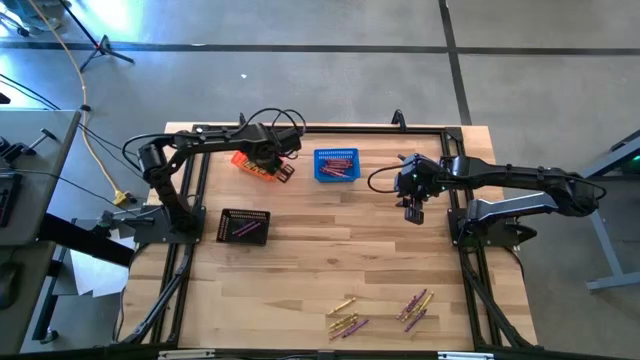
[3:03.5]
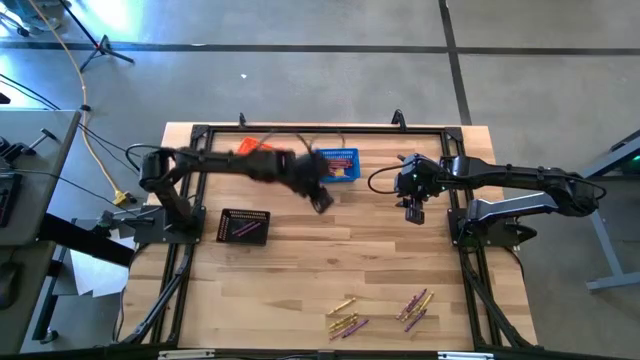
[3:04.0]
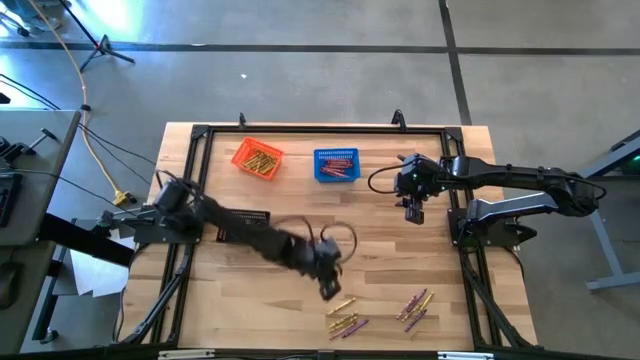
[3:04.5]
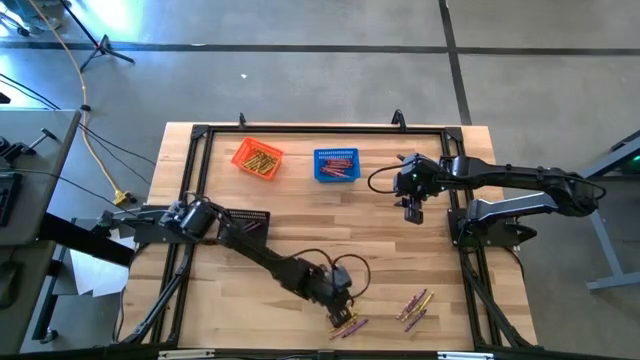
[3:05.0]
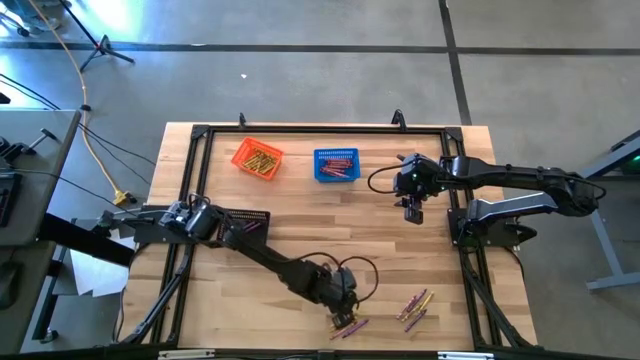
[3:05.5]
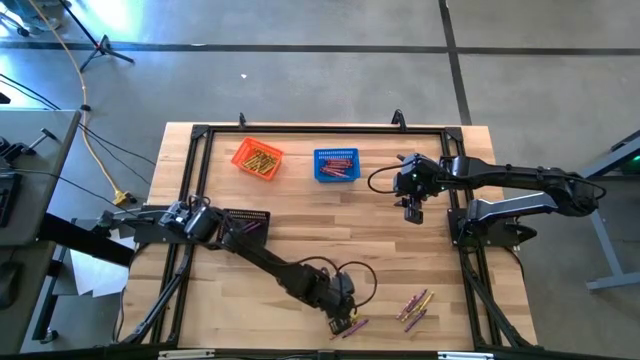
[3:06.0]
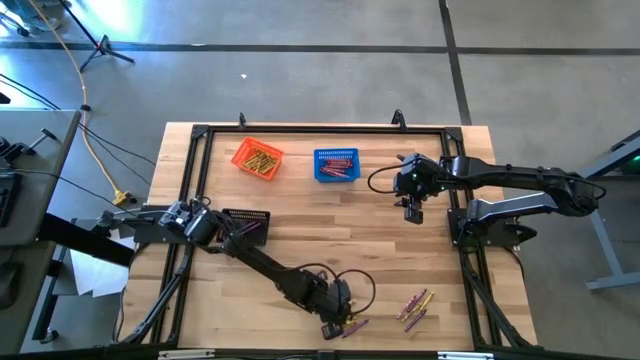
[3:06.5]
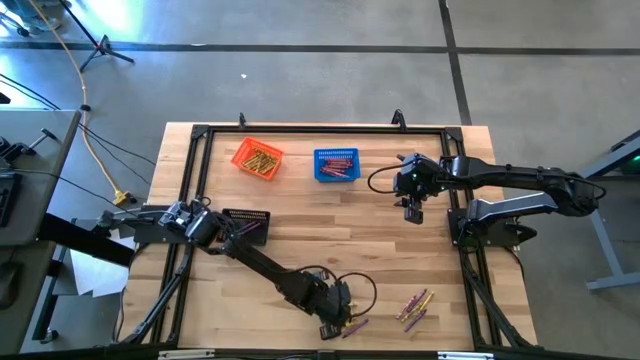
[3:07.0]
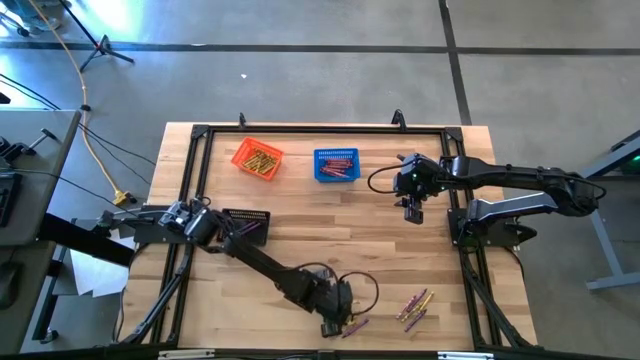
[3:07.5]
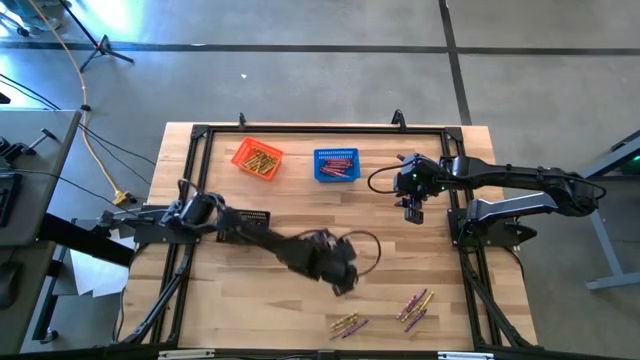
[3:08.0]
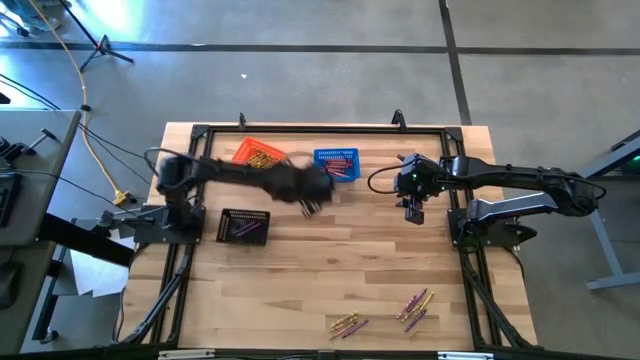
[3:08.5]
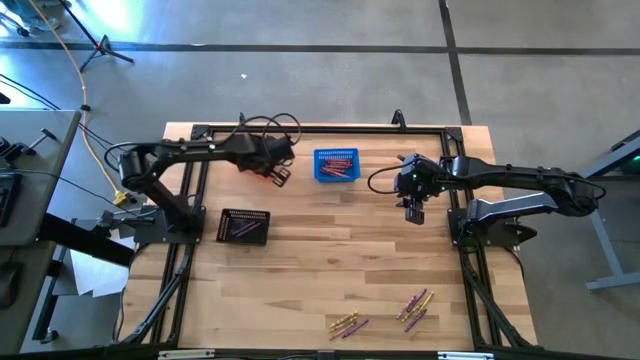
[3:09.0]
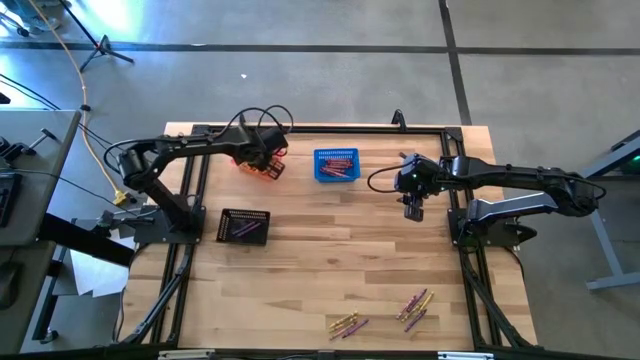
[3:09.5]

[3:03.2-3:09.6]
Task: Sort crayons
Put the yellow crayon into the orange bin

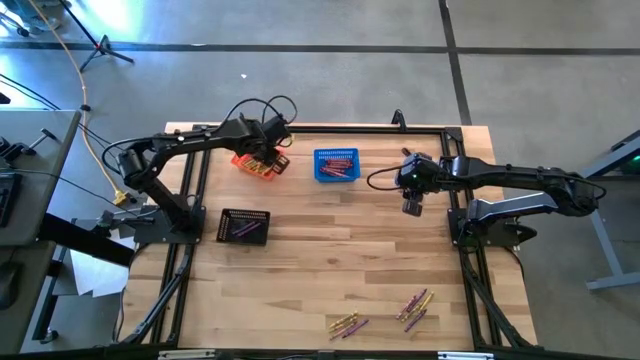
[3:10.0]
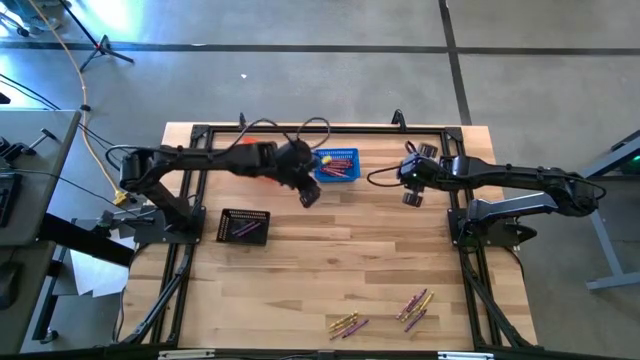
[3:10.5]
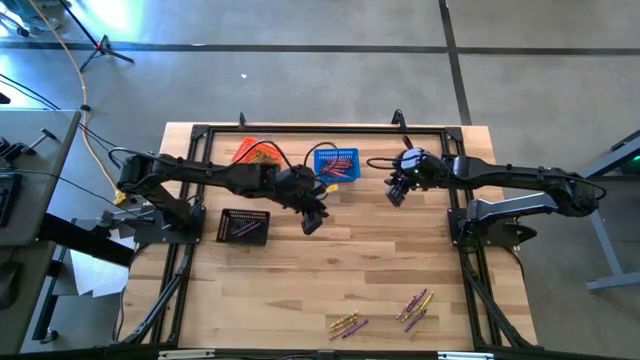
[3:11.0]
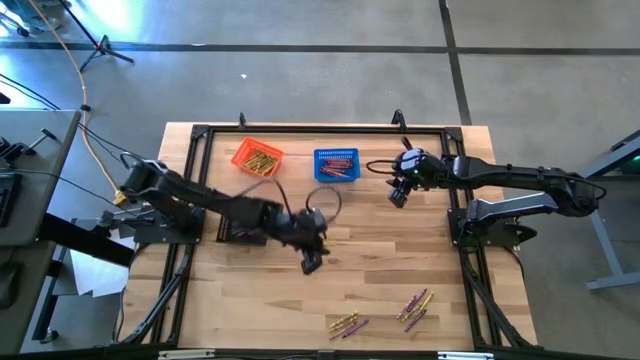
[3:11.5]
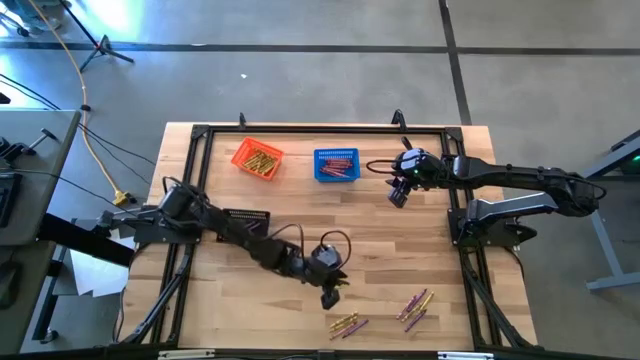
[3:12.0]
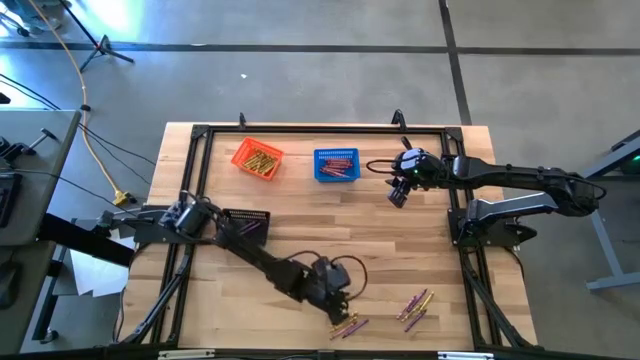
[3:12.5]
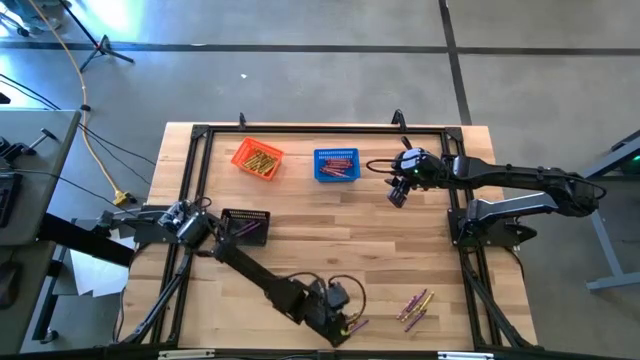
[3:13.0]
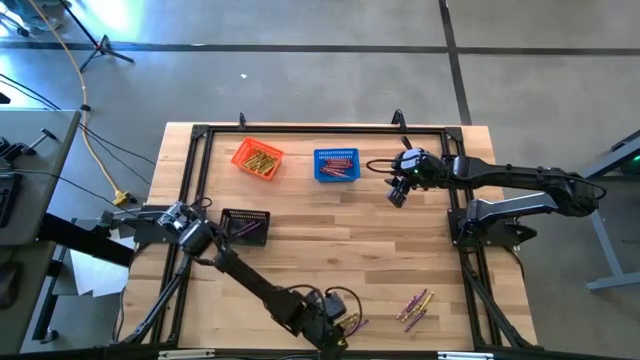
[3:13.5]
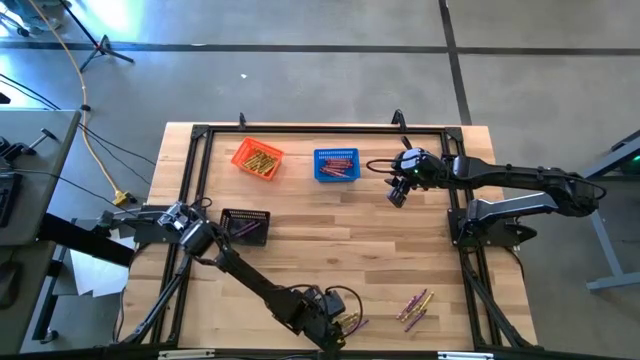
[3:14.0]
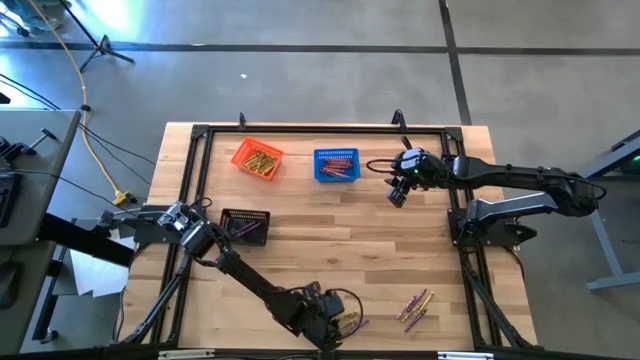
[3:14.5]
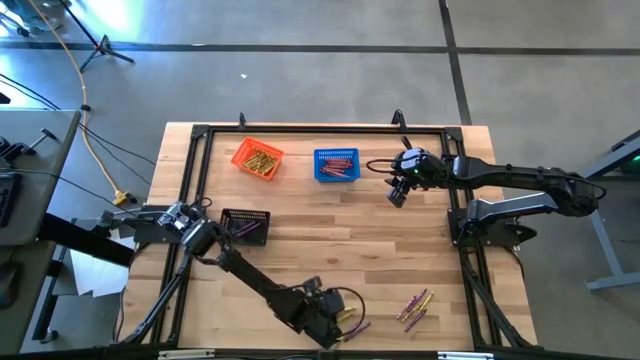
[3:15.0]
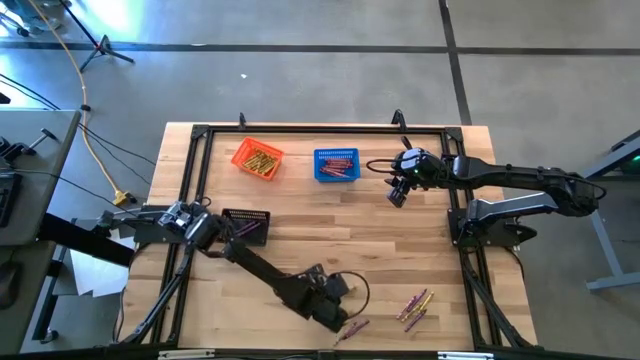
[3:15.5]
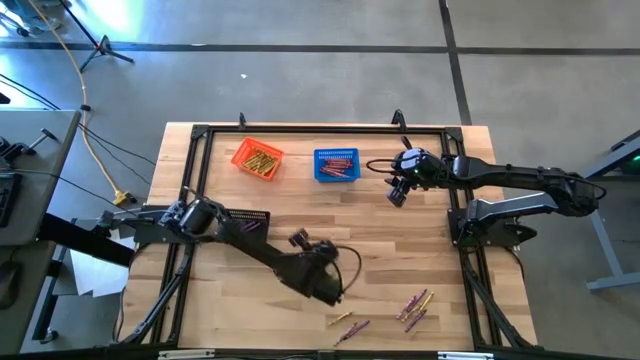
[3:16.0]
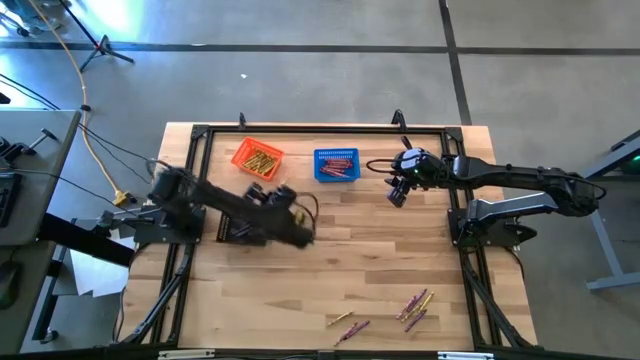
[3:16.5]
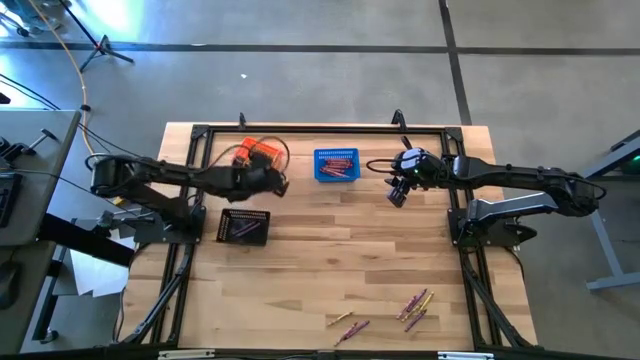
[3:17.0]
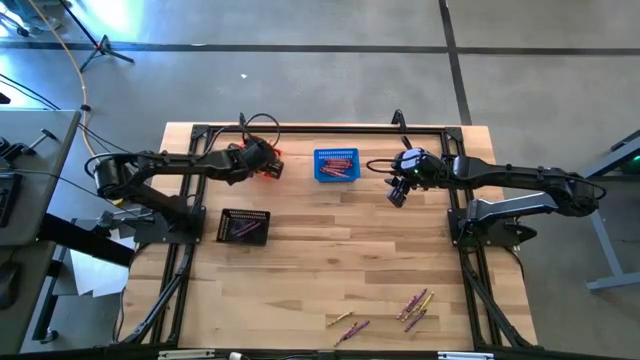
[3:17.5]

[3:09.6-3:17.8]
Put the yellow crayon into the orange bin

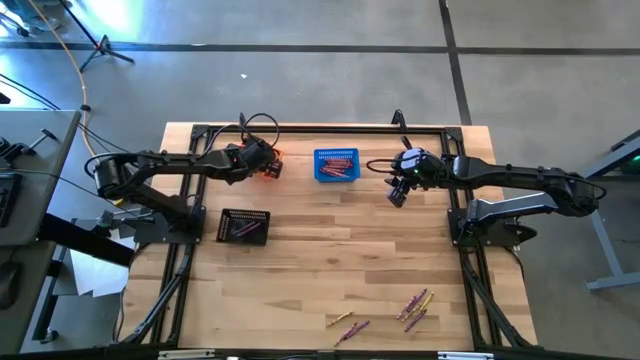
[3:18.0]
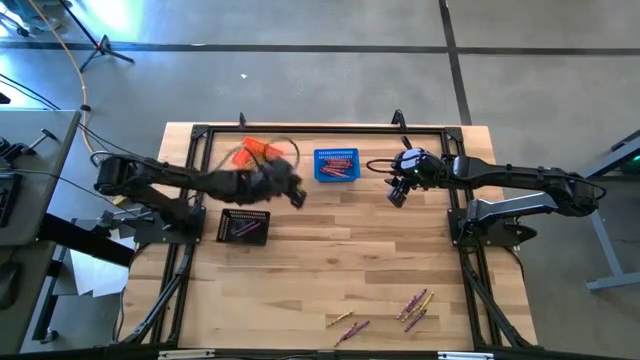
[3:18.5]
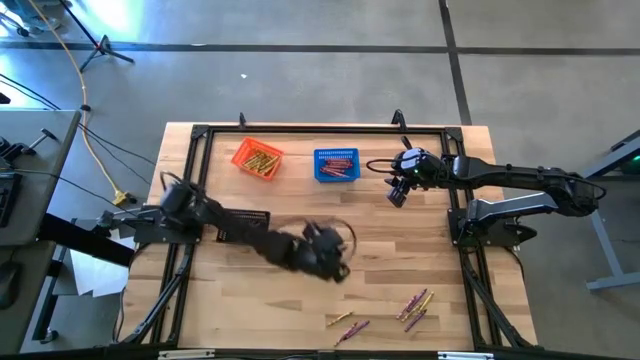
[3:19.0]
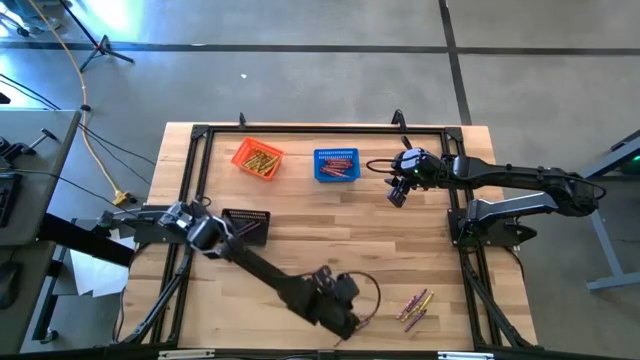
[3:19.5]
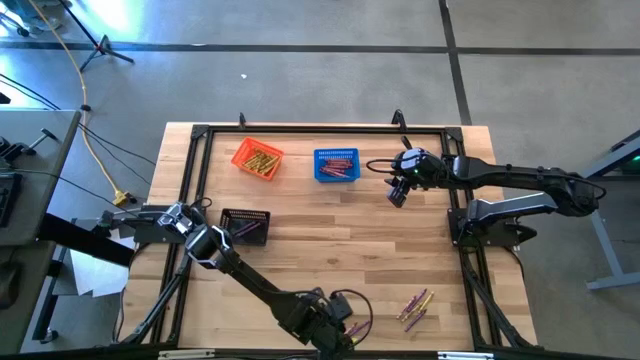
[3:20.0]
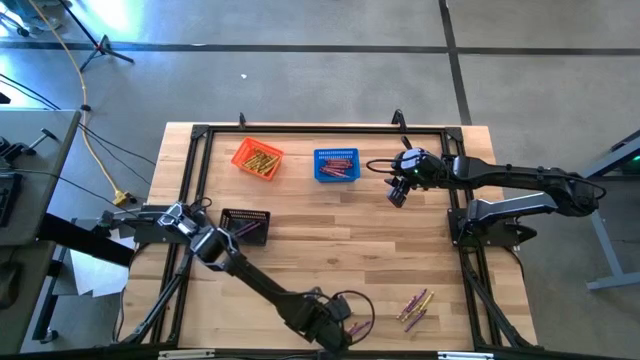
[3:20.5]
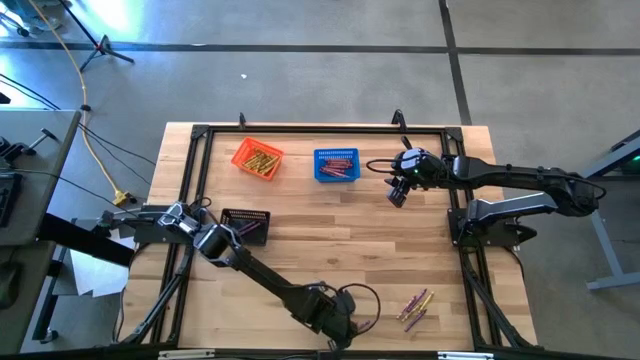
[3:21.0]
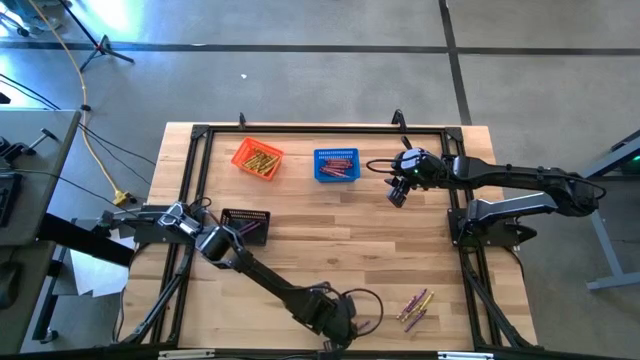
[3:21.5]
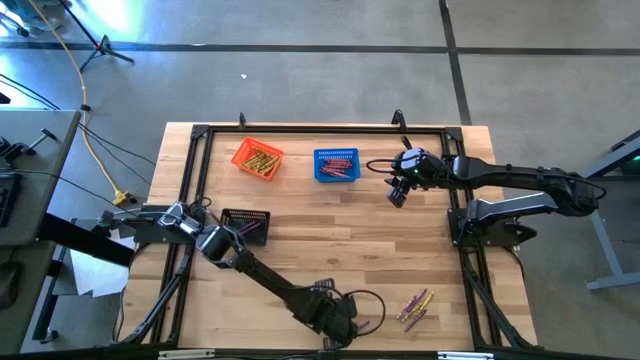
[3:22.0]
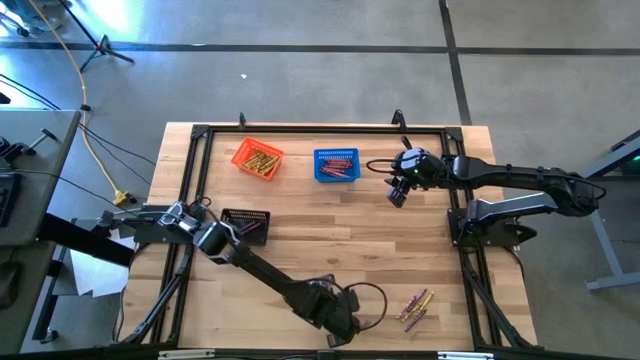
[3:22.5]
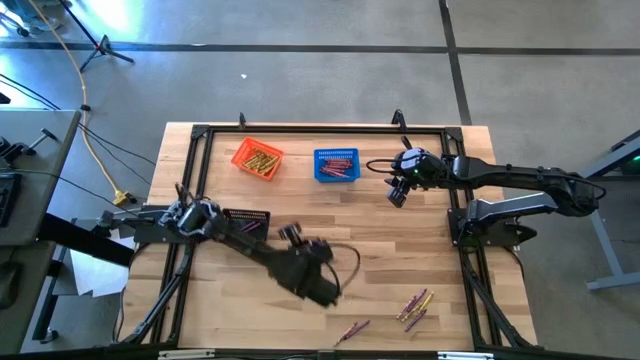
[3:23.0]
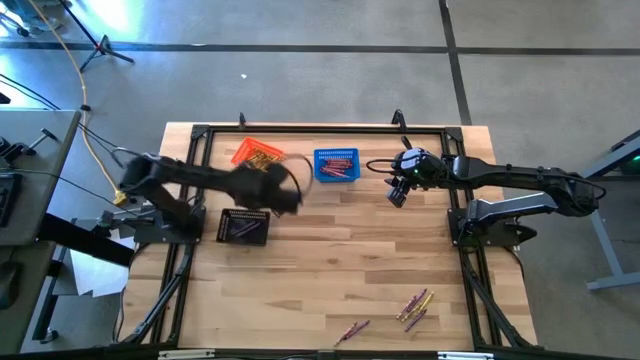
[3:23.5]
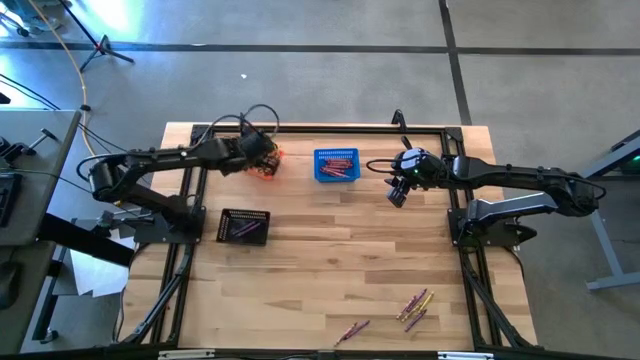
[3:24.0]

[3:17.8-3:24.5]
Put the yellow crayon into the orange bin
